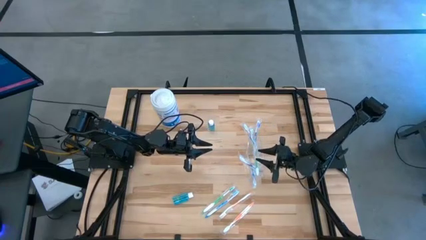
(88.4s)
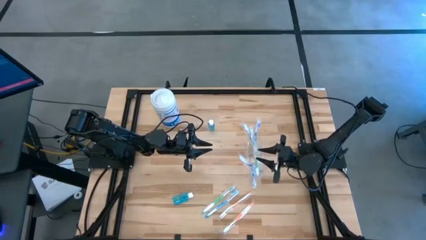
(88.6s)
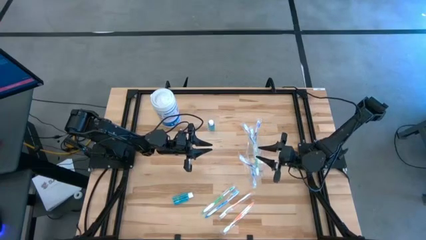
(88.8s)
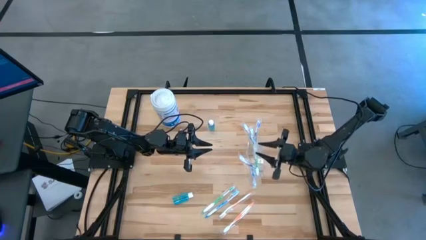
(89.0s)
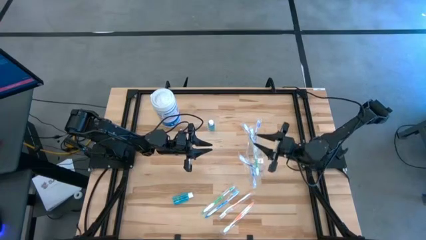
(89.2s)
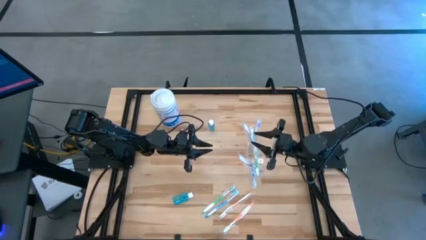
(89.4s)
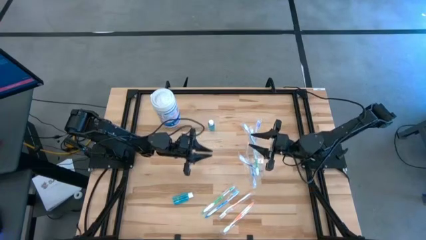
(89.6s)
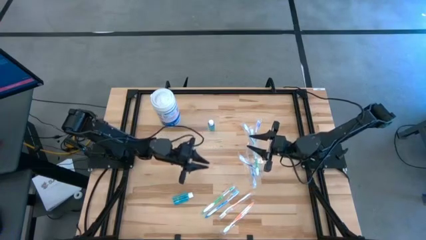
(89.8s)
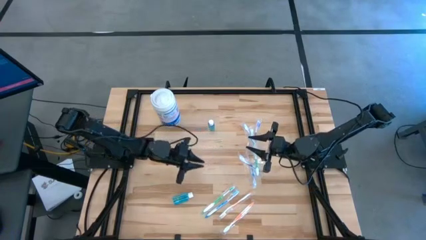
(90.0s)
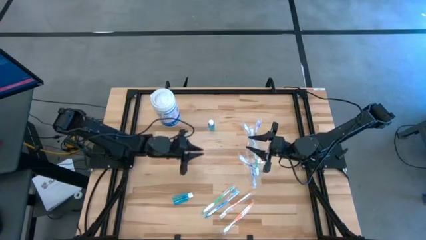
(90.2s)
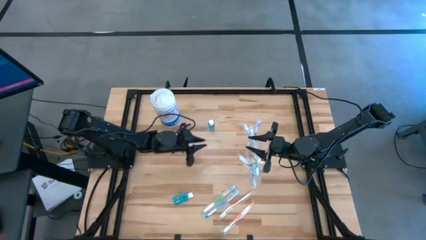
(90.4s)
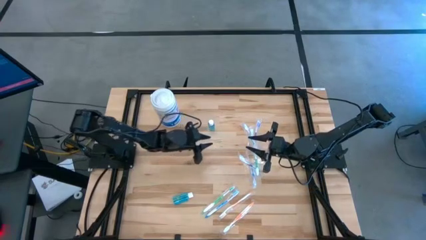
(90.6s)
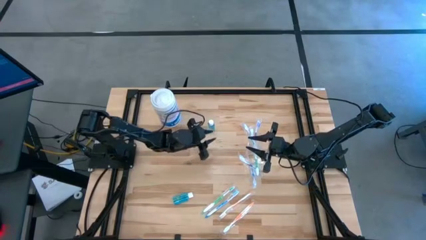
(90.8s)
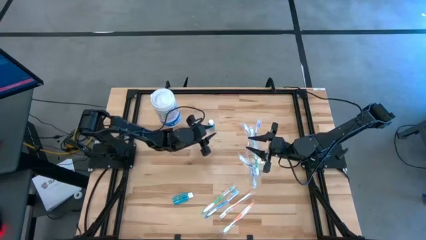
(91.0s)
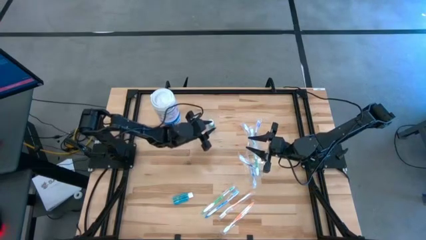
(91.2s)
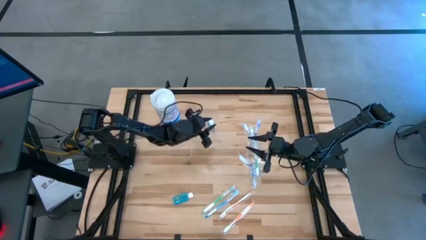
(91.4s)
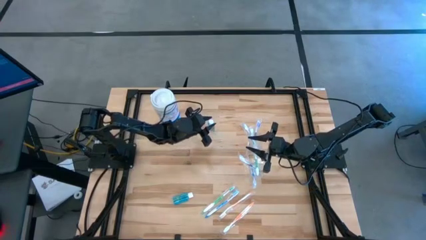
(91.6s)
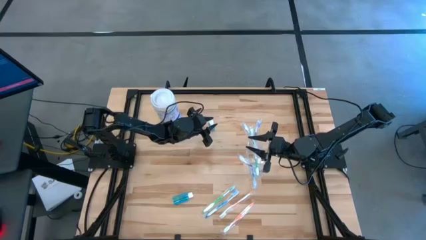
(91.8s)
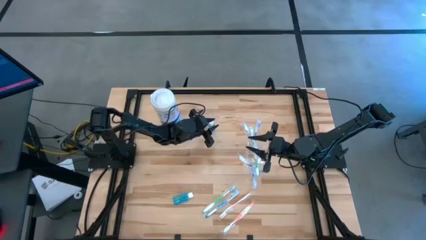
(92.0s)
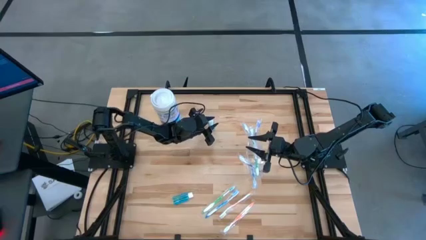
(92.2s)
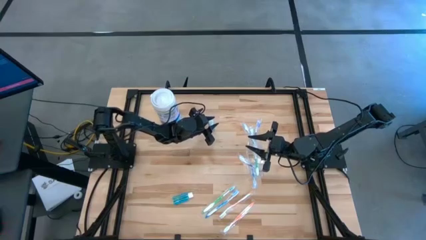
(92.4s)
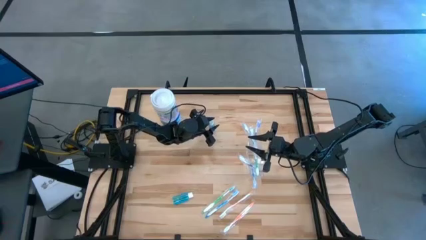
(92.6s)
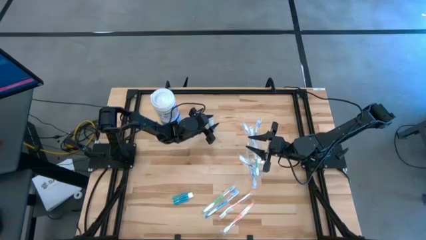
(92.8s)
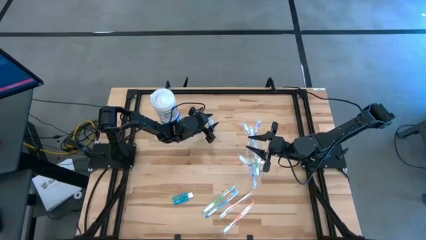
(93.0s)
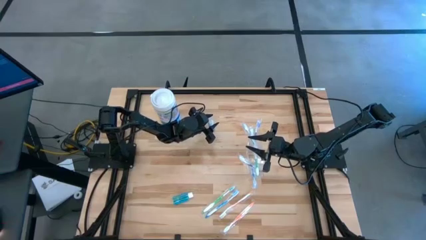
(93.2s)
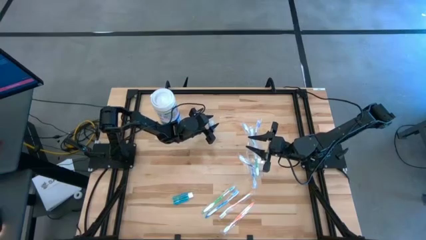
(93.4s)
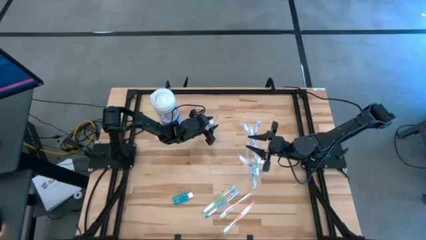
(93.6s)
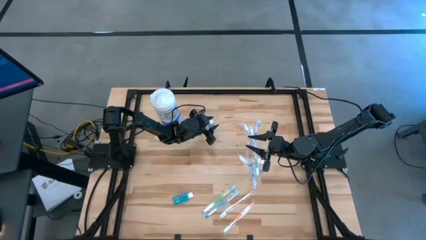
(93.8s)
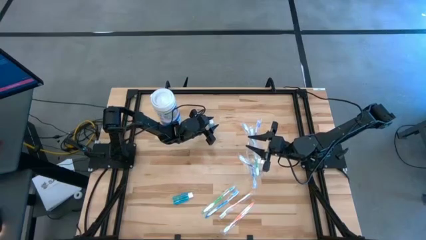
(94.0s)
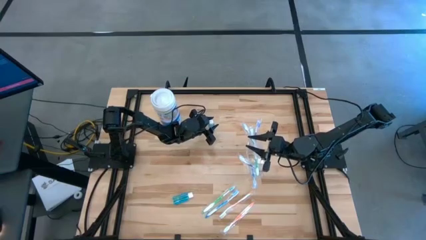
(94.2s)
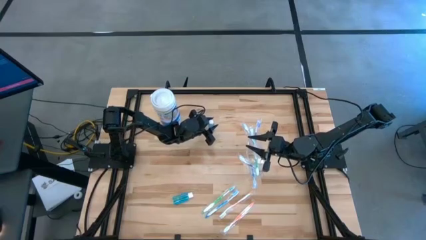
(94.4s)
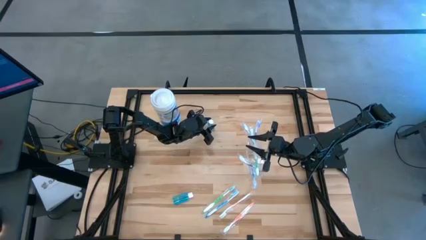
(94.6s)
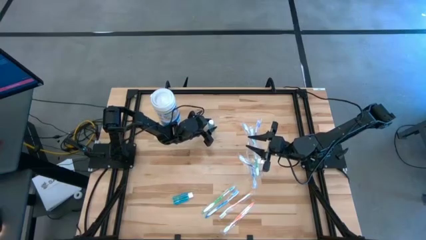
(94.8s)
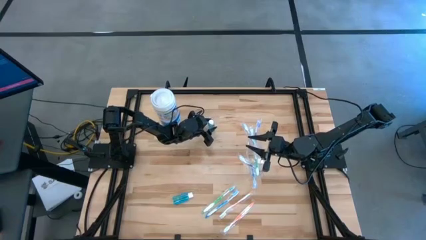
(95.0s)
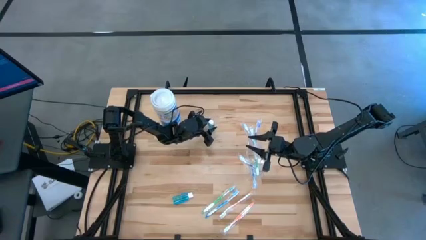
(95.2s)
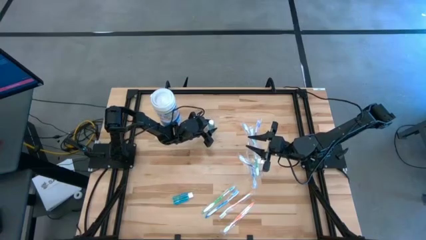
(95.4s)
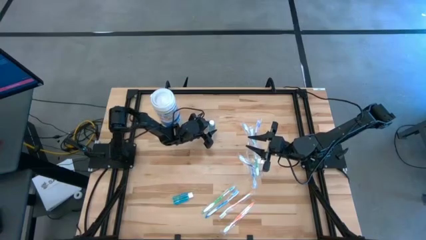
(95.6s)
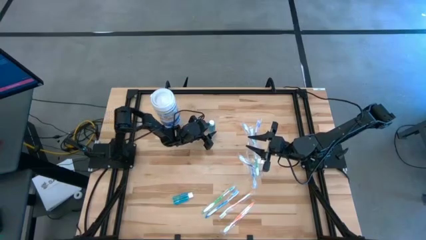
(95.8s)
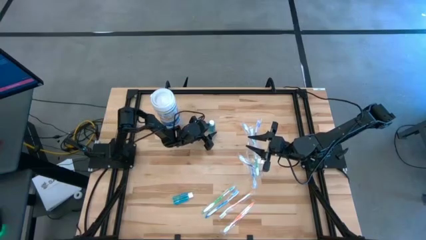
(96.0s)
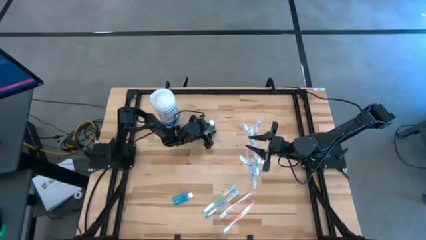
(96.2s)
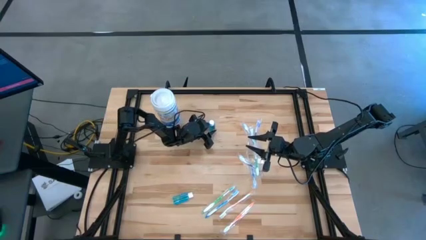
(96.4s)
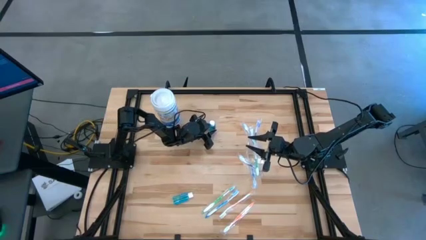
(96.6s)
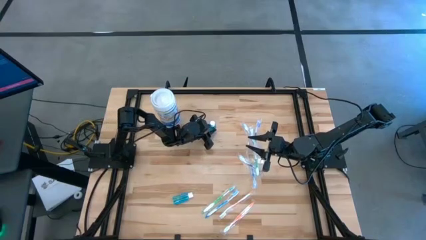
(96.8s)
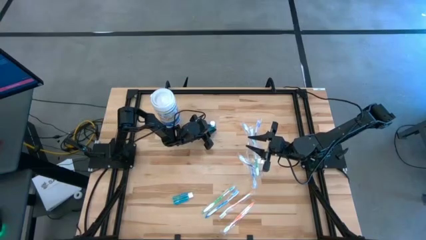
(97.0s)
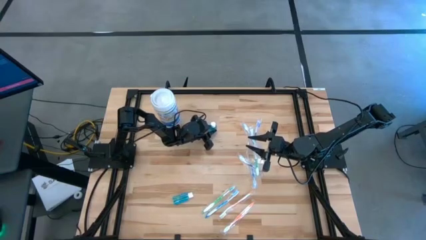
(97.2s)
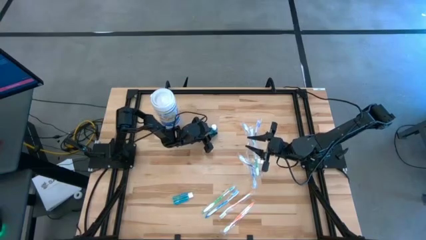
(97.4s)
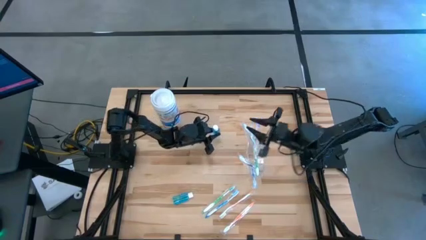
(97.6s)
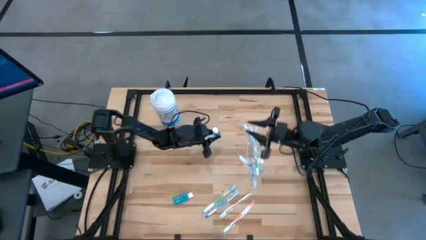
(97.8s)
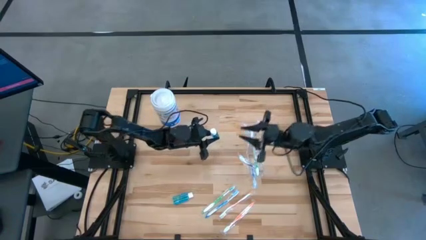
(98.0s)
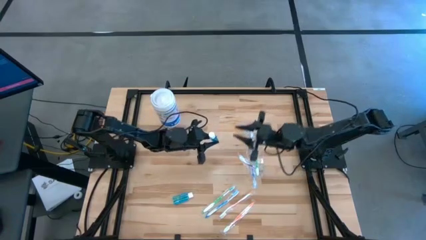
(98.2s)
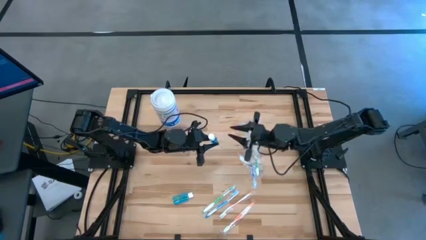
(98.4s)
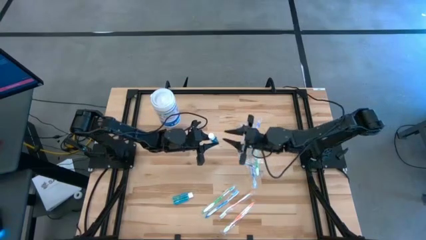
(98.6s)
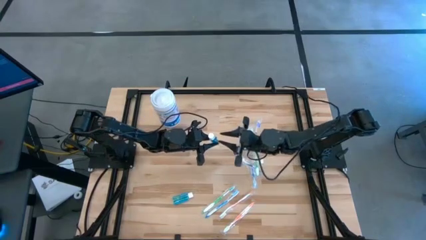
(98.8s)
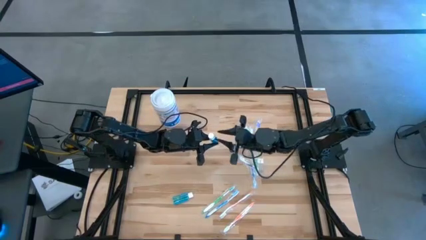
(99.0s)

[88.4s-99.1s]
Task: Pick & Place toothbrushing station
Put the blue mouthwash into the transparent organizer

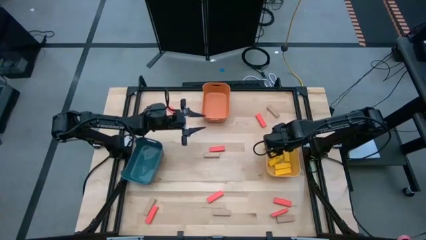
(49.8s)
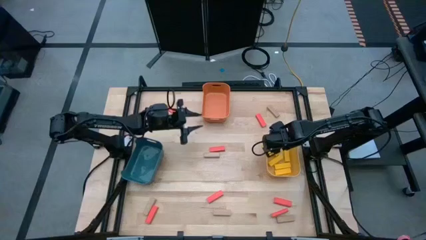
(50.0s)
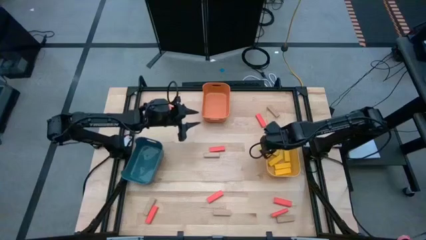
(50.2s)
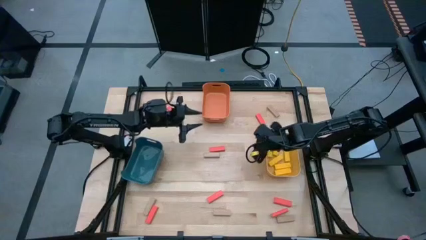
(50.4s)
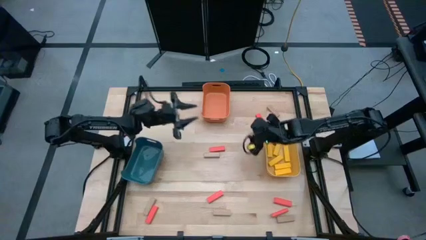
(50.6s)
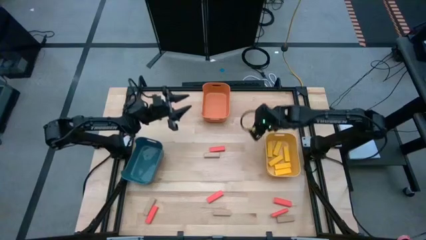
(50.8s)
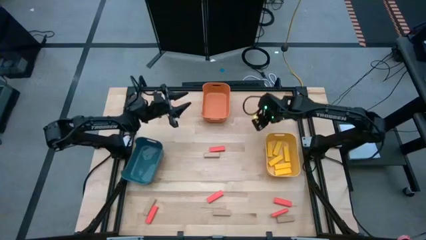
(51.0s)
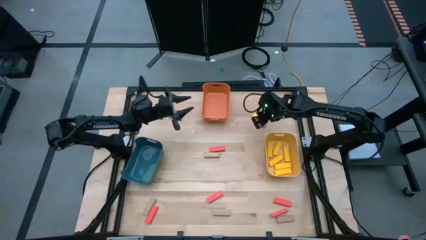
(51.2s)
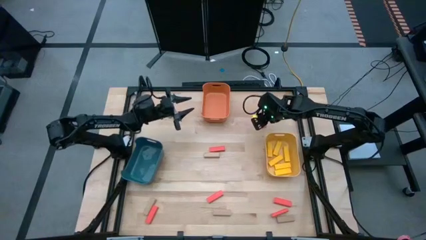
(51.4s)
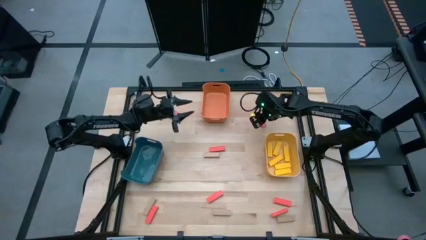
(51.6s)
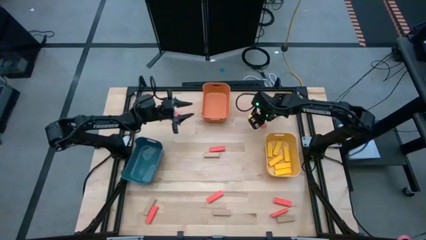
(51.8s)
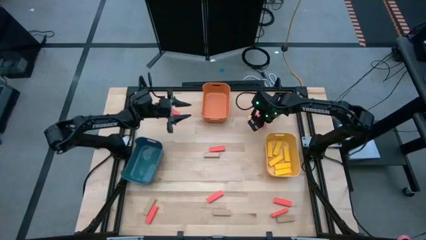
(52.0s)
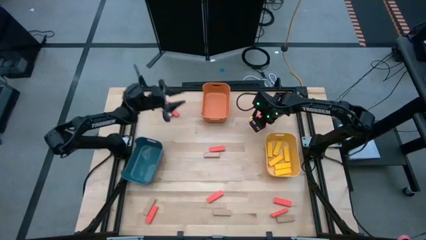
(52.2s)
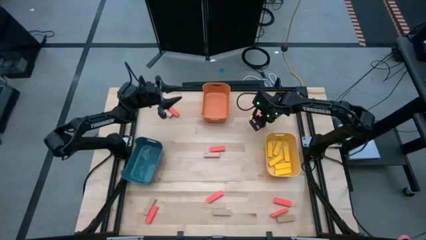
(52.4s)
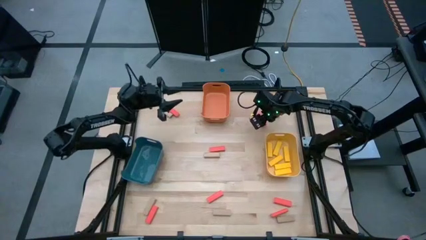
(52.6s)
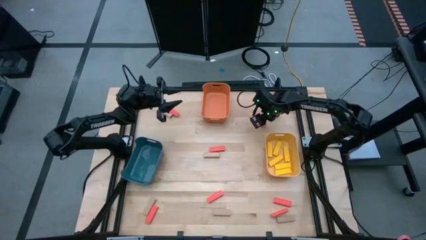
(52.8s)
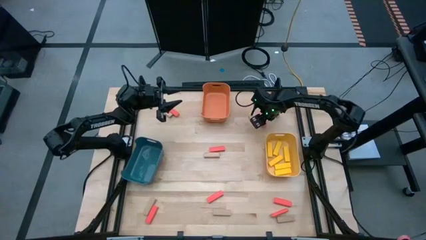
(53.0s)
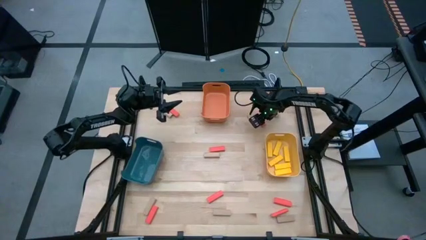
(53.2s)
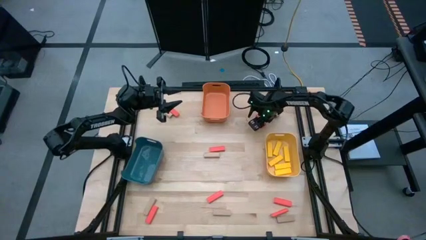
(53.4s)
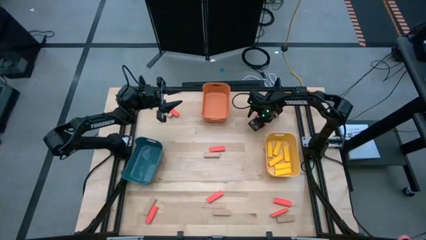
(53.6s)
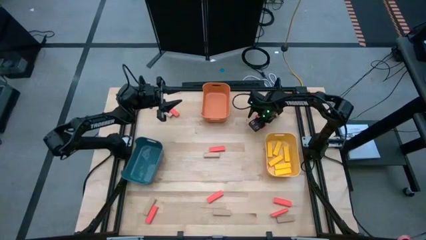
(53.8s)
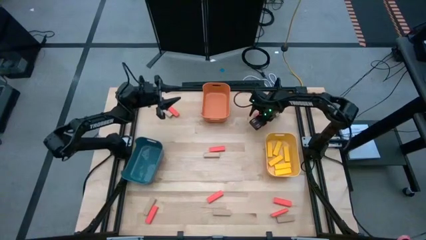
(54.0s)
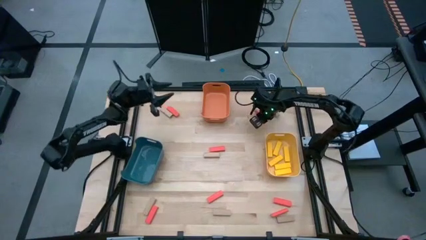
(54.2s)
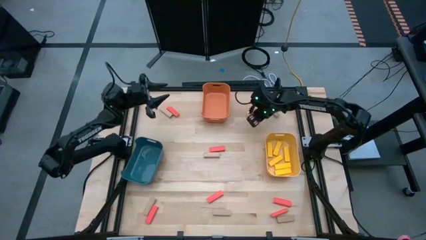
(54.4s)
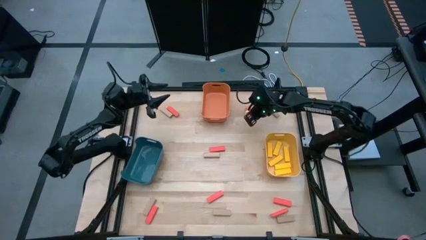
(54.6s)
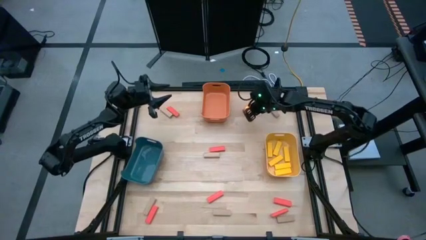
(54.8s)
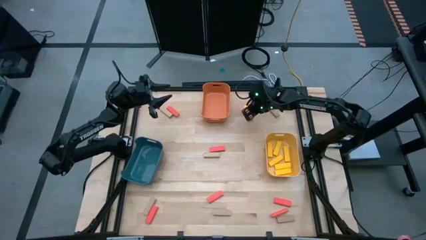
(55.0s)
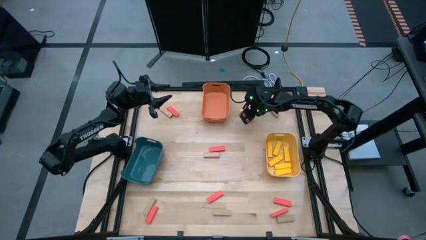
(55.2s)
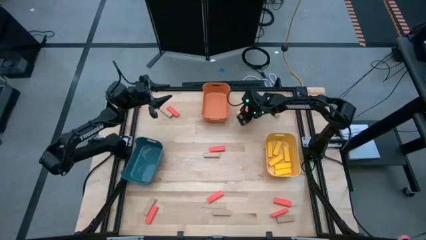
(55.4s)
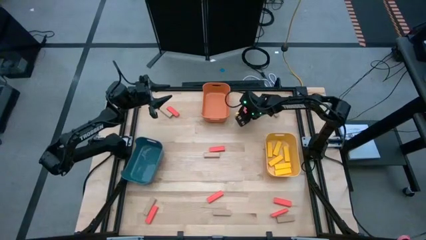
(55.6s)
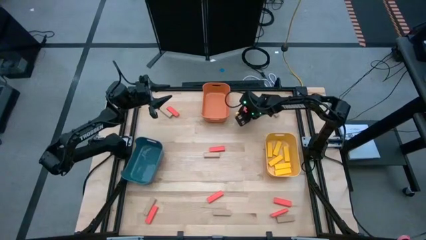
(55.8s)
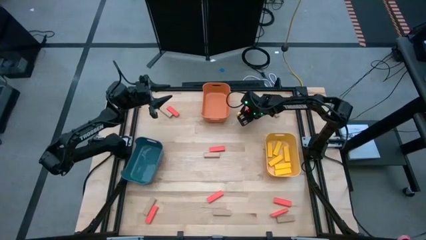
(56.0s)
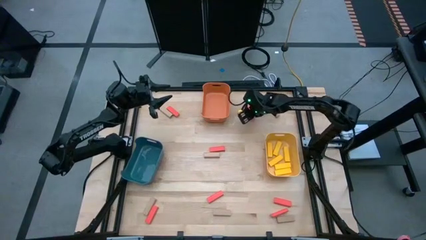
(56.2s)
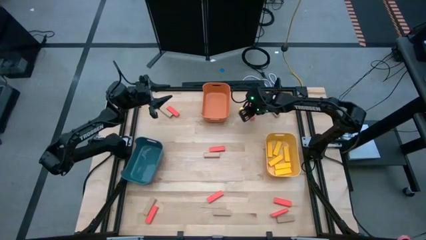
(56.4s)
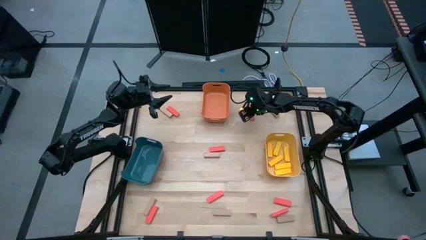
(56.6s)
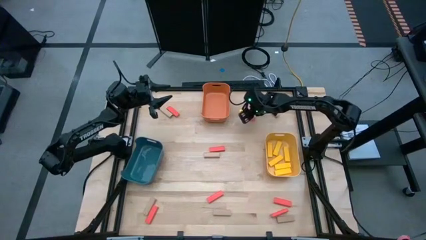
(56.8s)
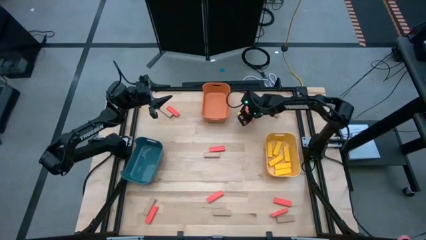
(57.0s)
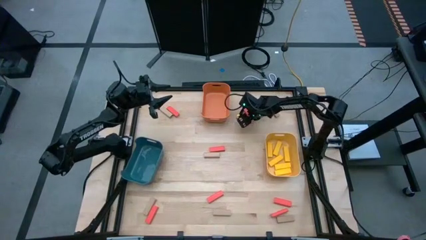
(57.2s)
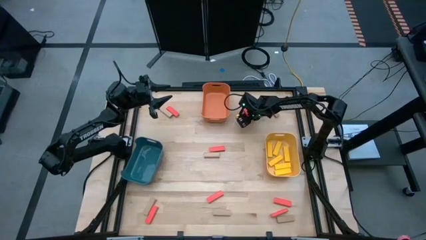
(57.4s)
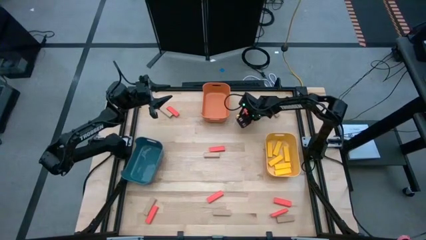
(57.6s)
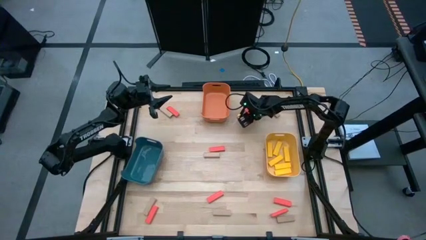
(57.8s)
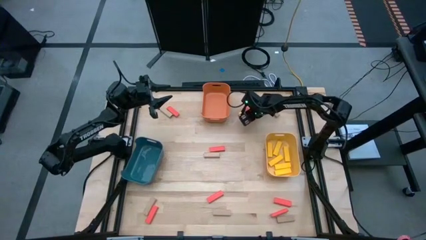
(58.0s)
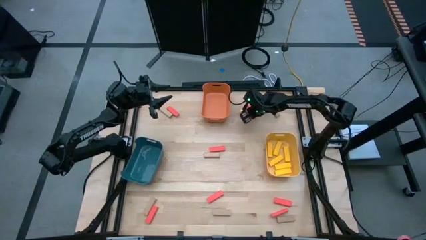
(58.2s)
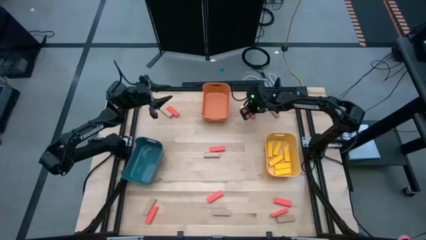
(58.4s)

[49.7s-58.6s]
Task: Sort blocks
Put the top right orange block into the orange bin
